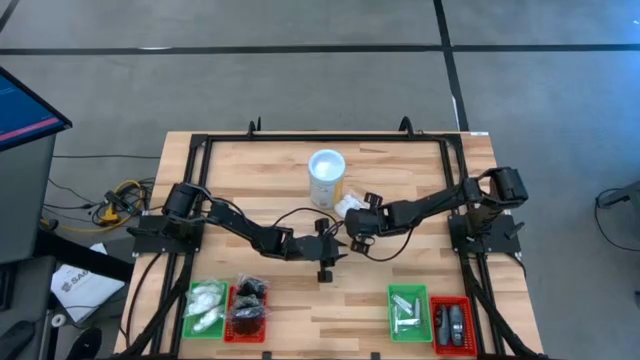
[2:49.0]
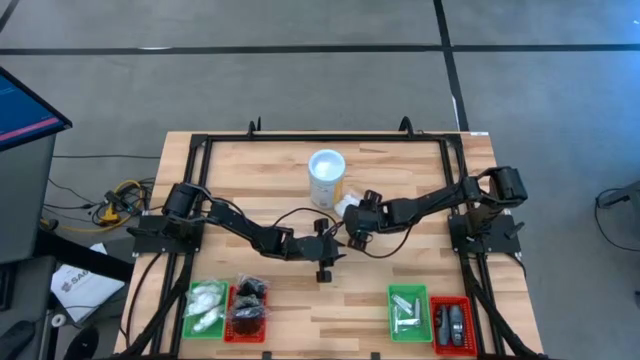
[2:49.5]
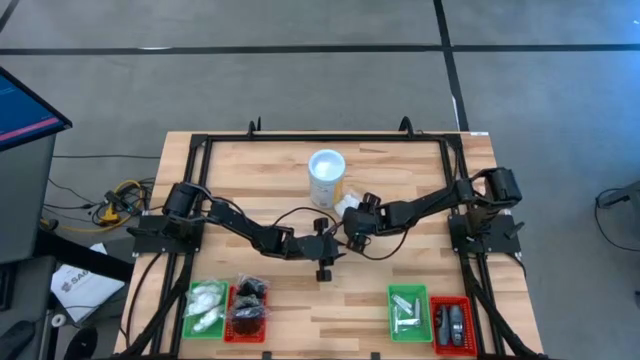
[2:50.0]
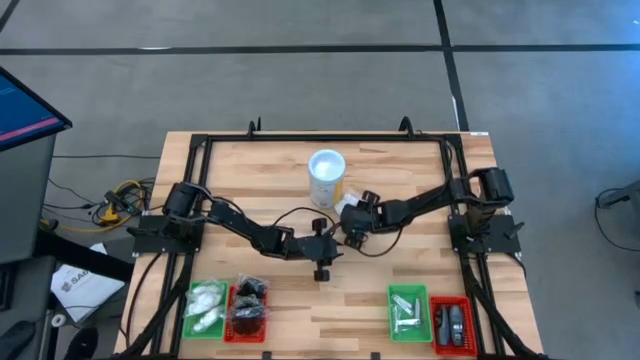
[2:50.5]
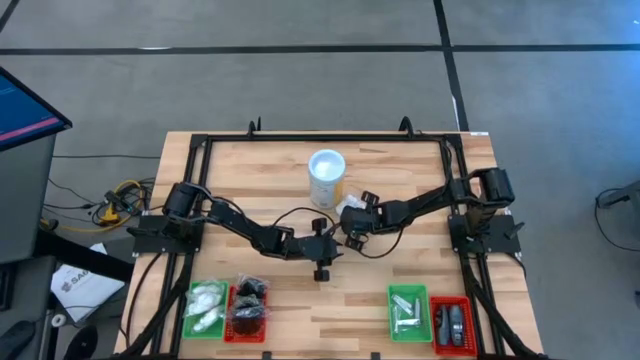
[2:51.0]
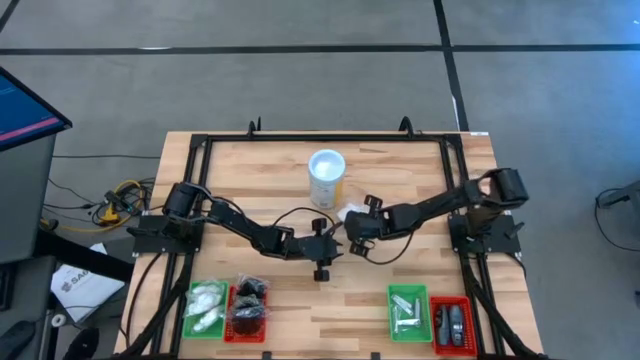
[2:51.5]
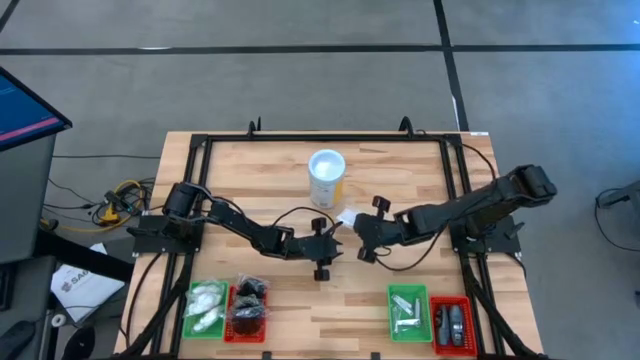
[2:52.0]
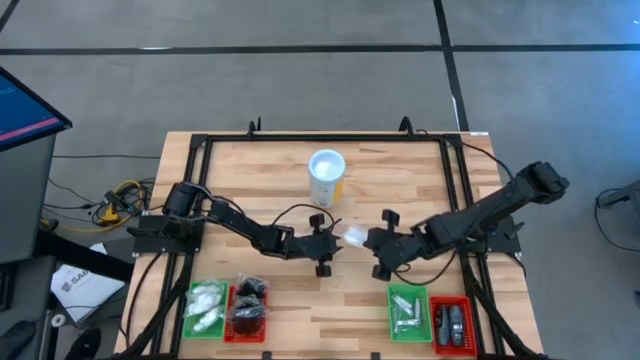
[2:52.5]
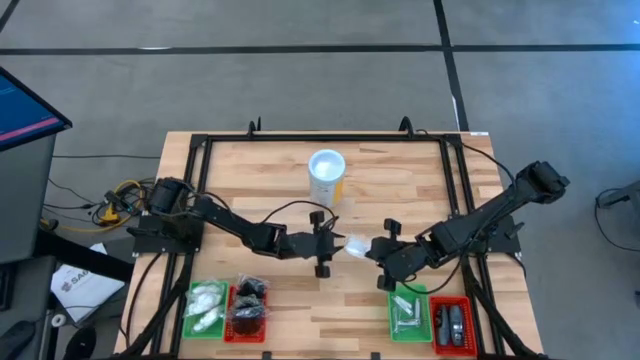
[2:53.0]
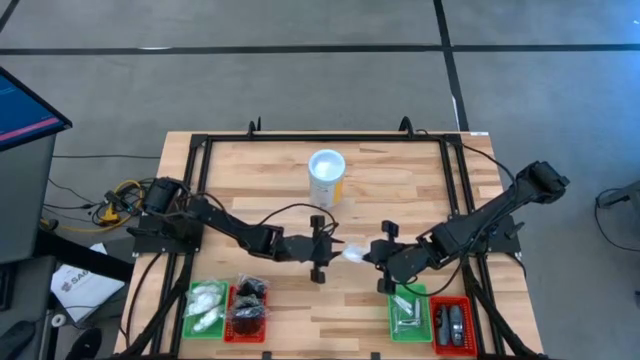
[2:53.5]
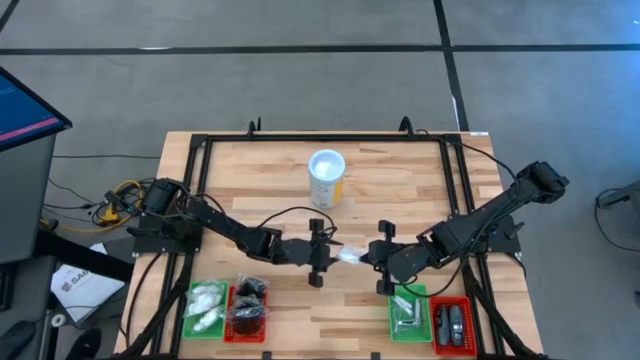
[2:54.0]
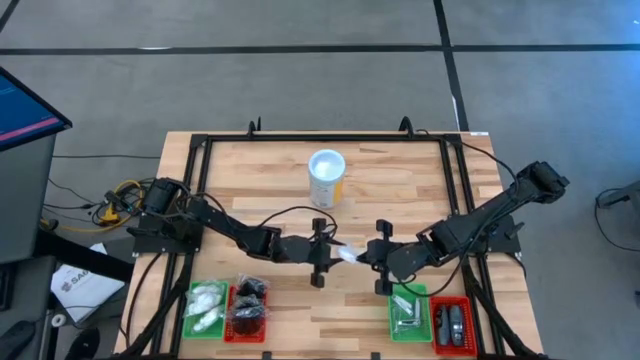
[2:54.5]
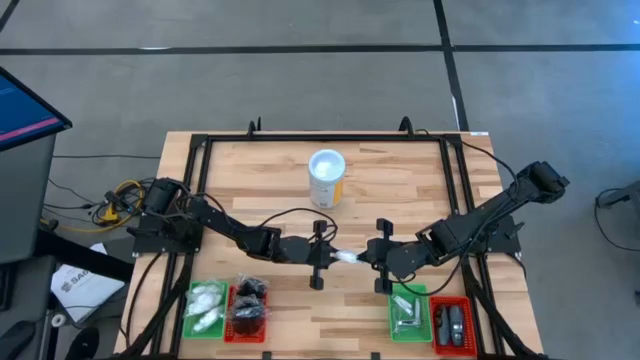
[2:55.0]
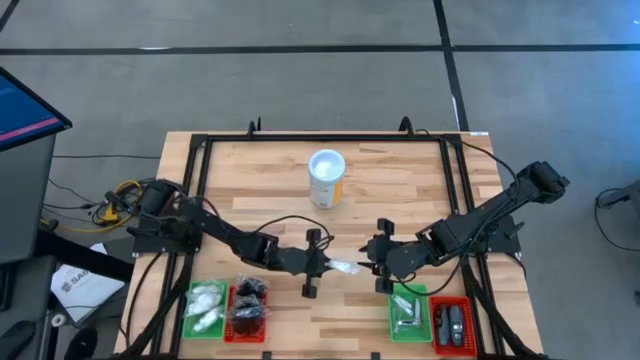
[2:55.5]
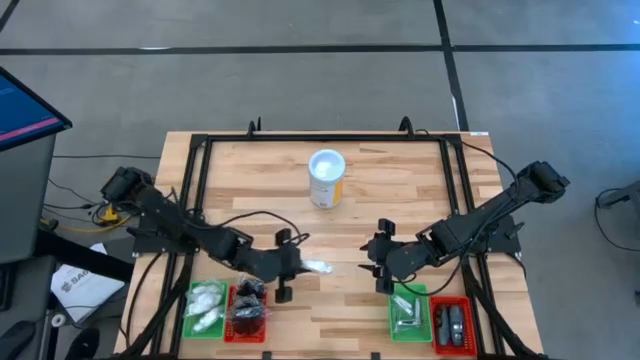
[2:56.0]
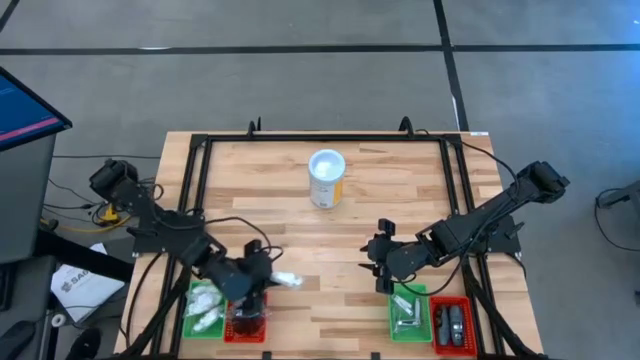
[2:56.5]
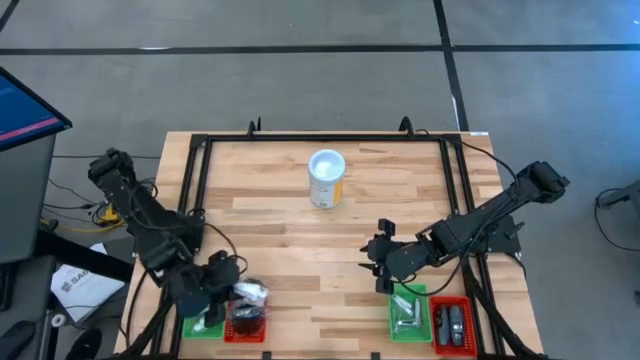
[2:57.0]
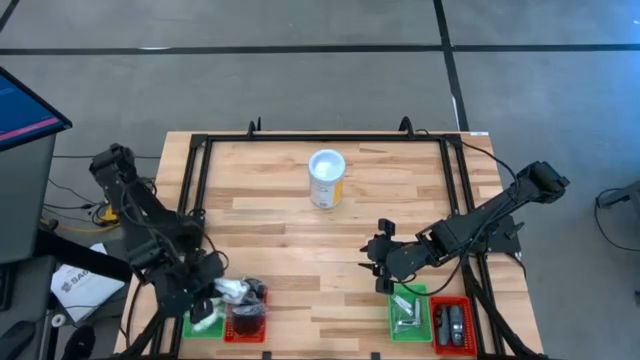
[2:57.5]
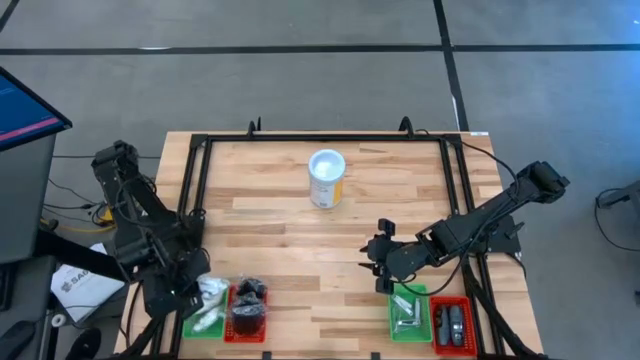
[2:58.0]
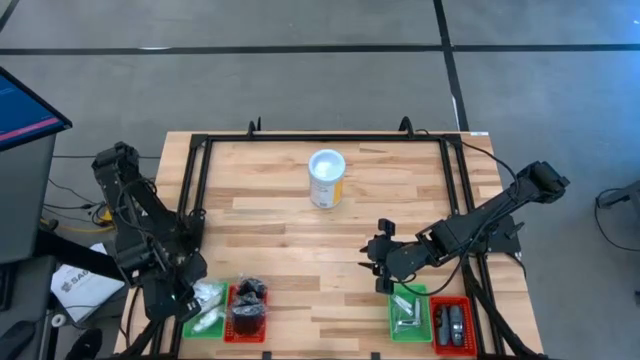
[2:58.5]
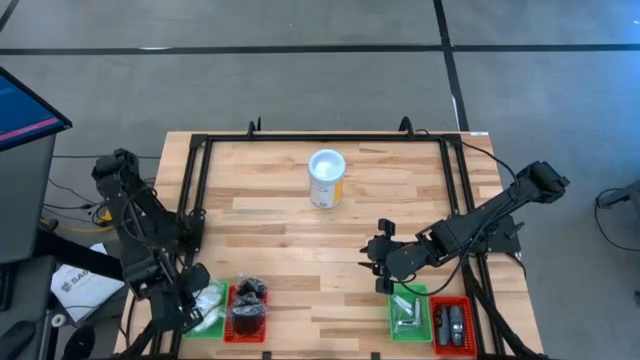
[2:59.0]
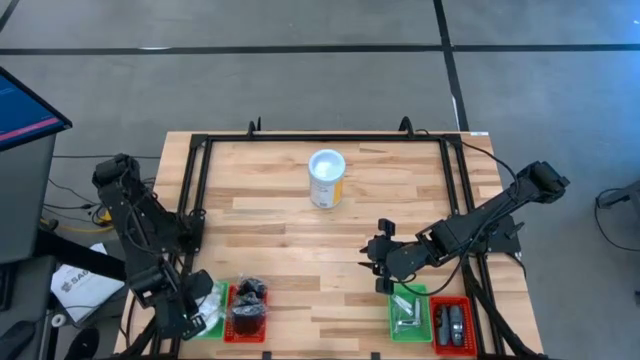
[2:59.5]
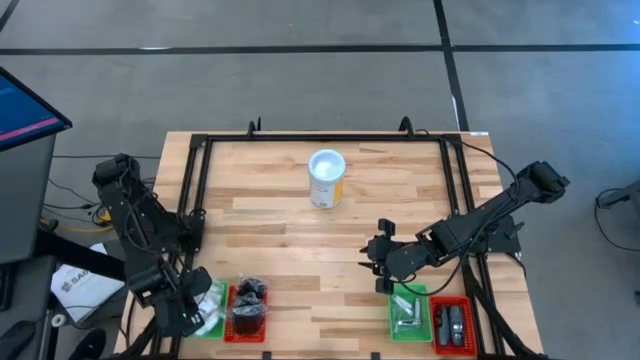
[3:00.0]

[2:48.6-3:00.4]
Task: Pick & Place Travel size toiletries
Put the cotton pack into the left green bin

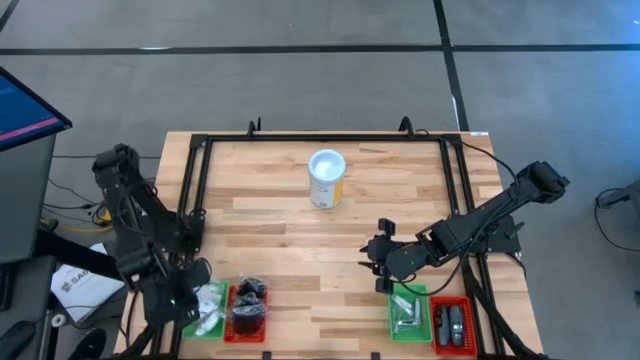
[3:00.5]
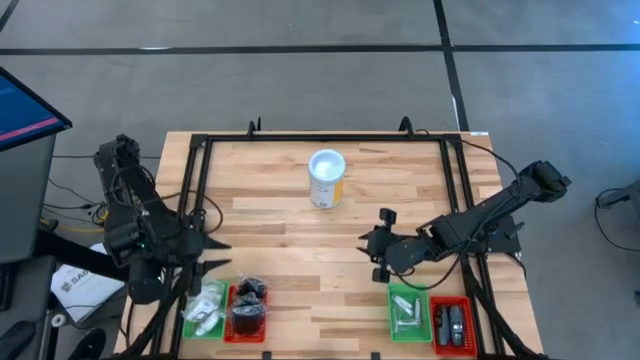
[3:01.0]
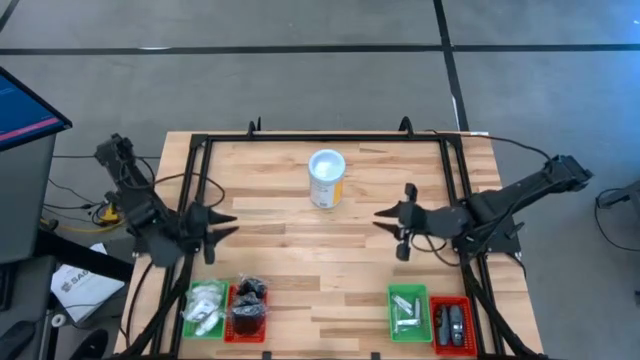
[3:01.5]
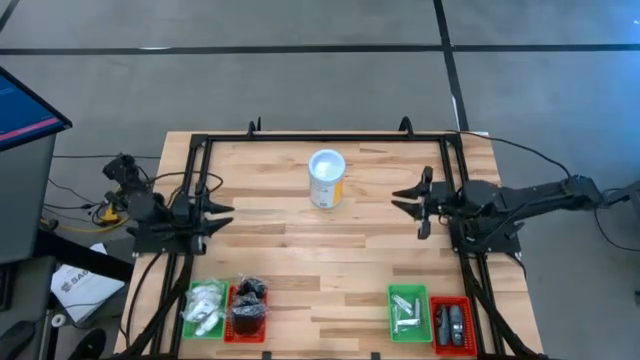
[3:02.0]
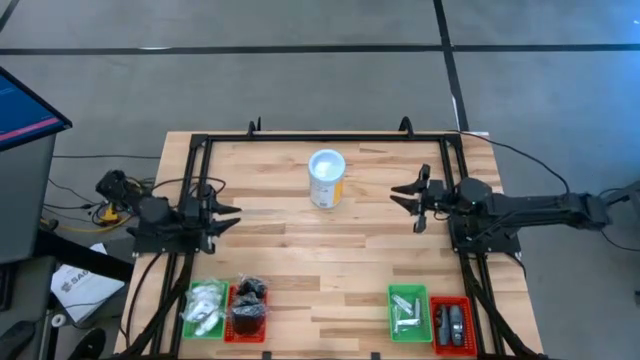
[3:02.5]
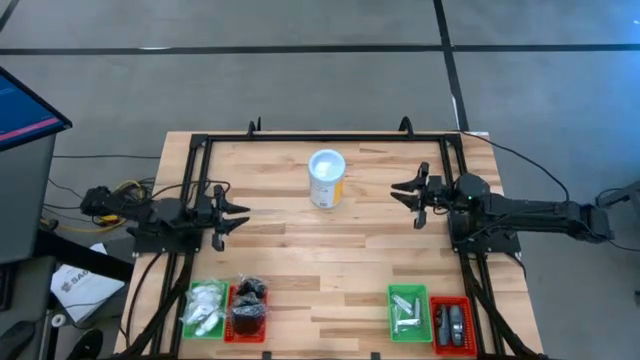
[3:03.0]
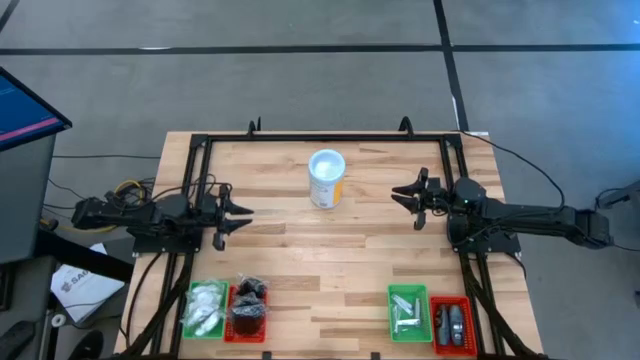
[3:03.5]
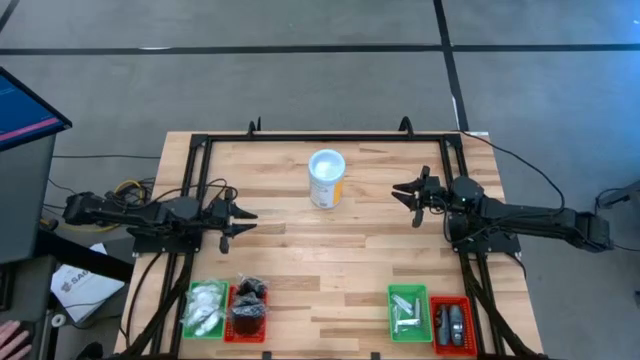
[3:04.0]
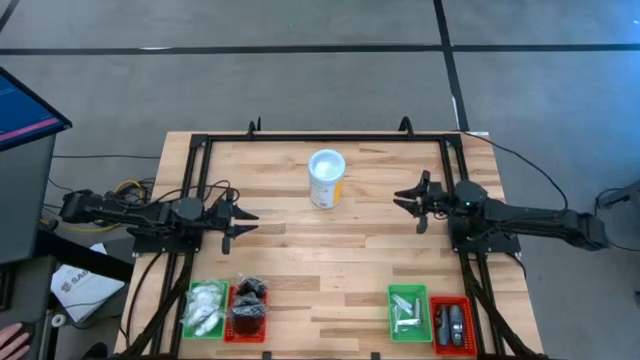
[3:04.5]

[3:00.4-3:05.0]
Return to Home Position

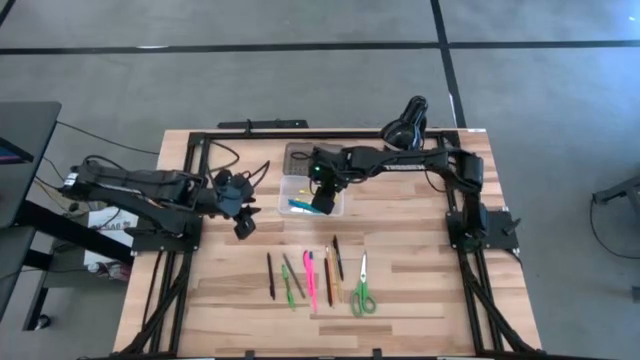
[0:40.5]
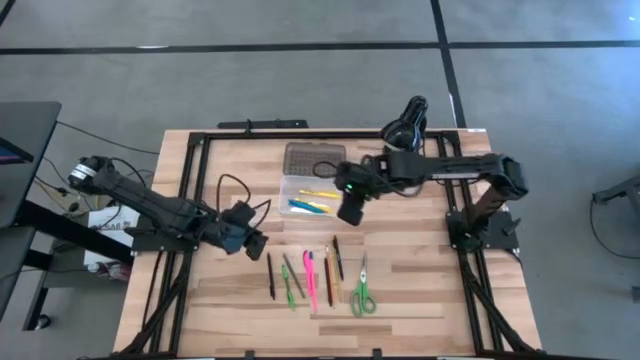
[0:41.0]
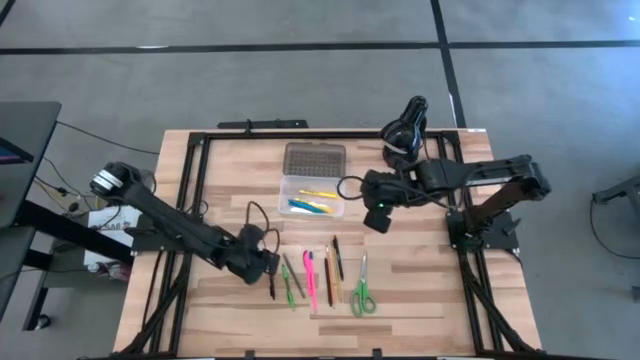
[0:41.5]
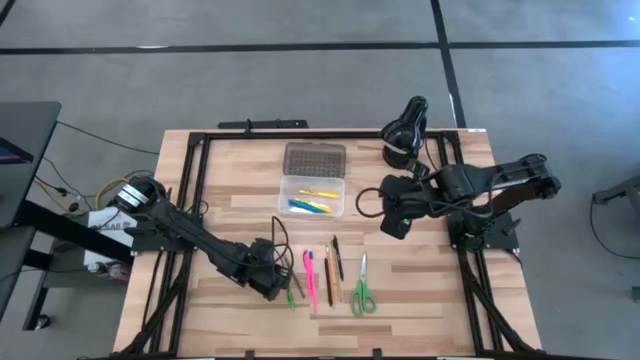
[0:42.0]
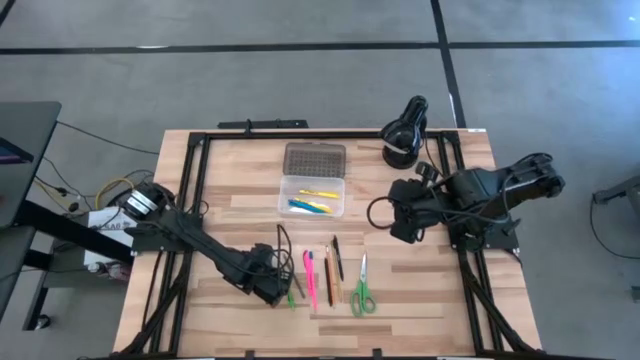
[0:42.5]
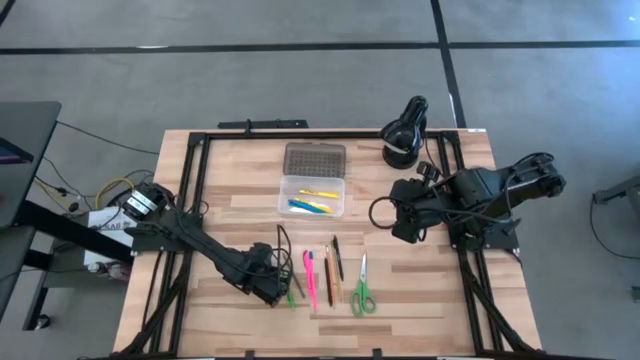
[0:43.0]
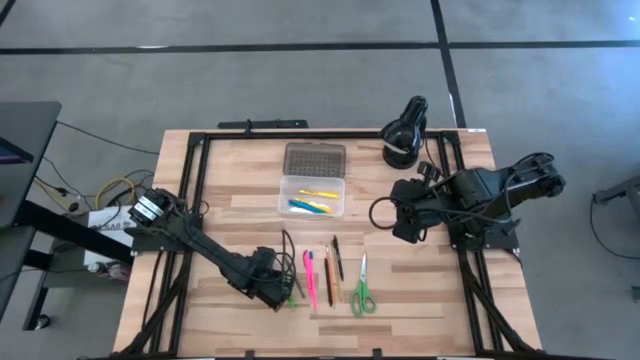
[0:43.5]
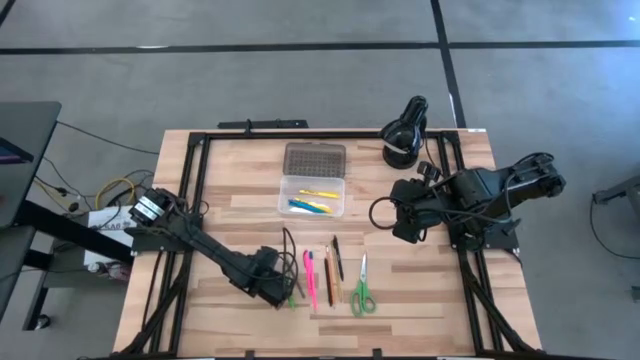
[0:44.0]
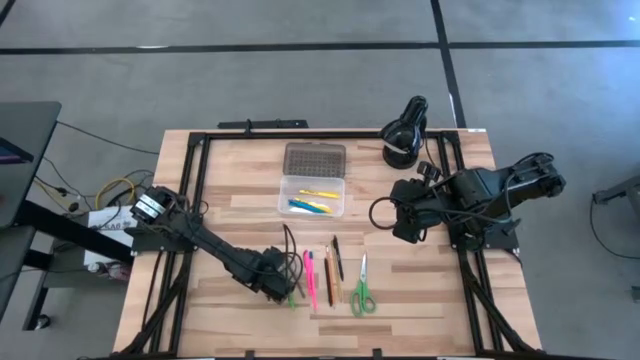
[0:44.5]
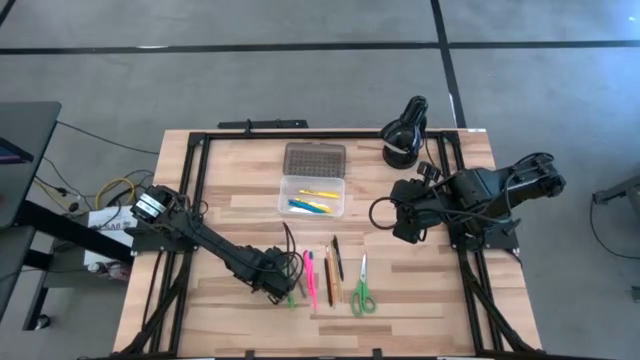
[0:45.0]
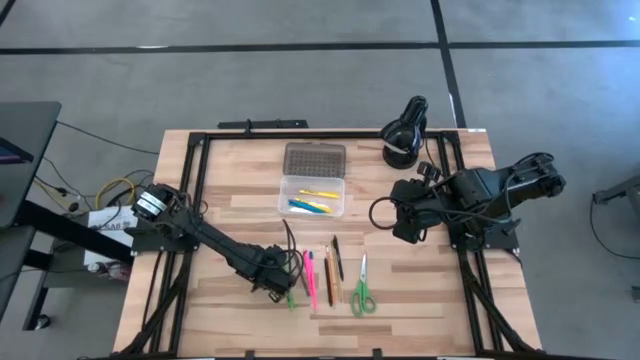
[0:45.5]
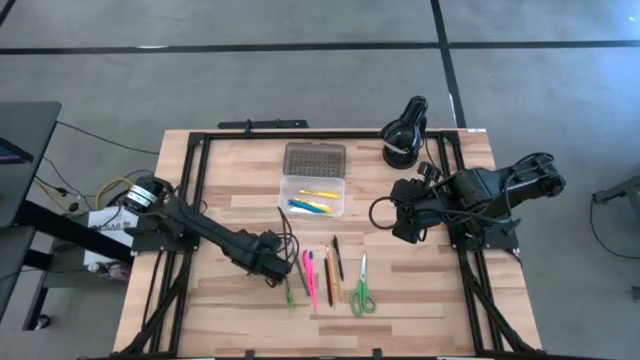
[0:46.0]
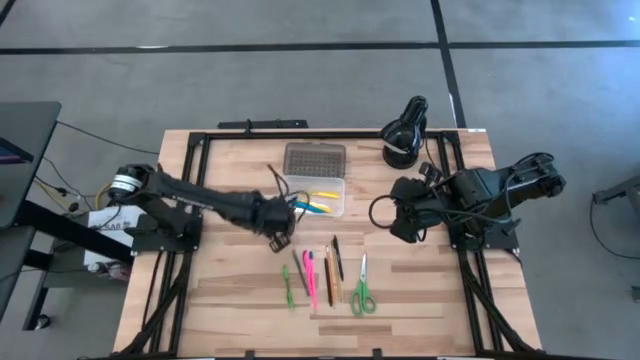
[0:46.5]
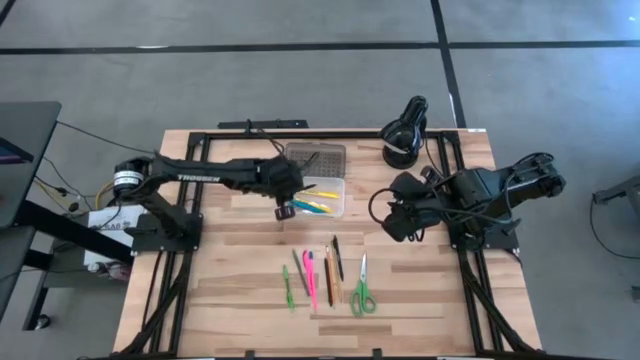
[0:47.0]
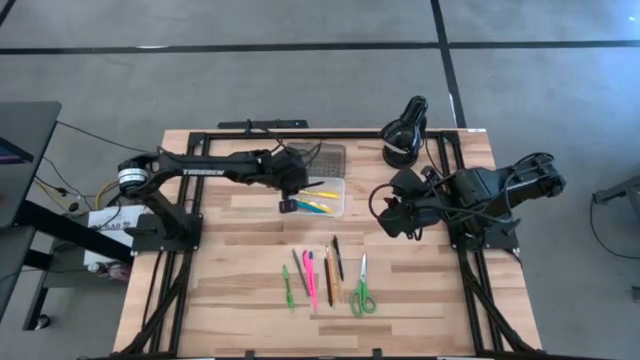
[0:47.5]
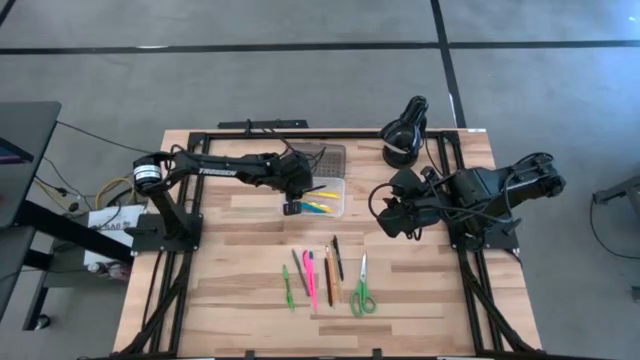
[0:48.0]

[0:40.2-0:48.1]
Task: Pick & place school supplies into a supply box
Put the left black pen into the supply box
